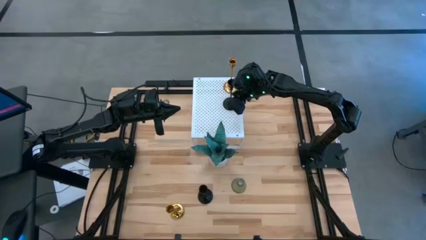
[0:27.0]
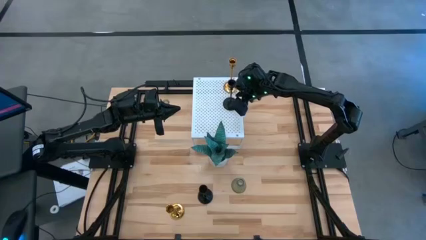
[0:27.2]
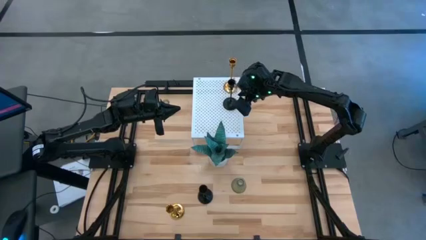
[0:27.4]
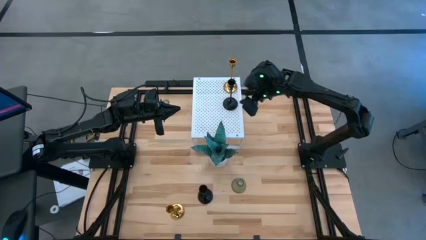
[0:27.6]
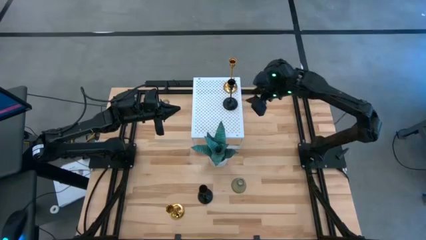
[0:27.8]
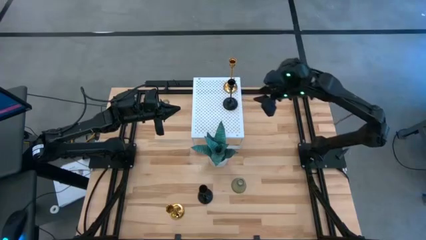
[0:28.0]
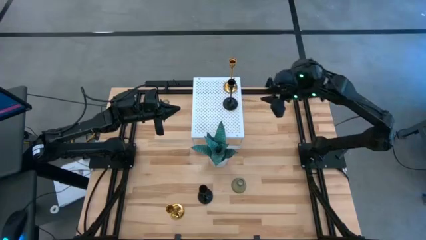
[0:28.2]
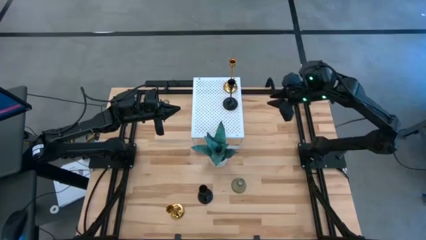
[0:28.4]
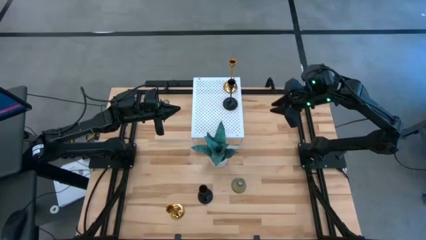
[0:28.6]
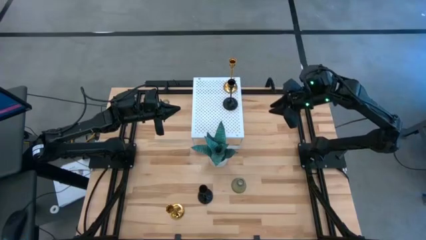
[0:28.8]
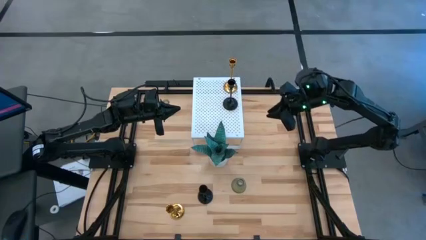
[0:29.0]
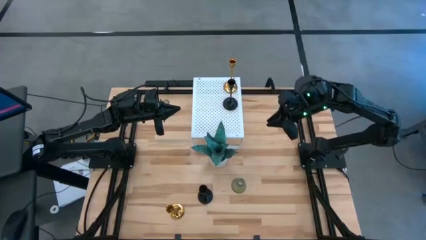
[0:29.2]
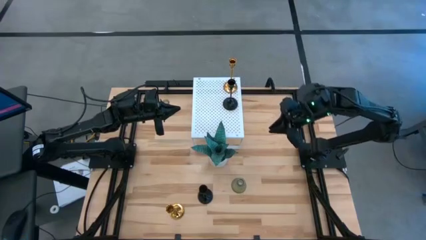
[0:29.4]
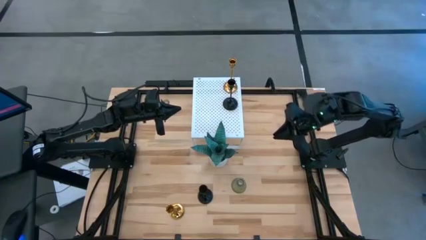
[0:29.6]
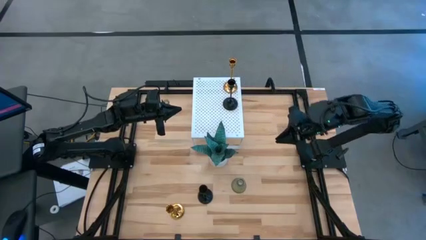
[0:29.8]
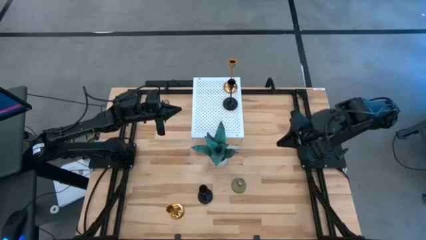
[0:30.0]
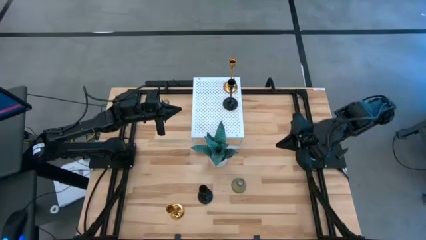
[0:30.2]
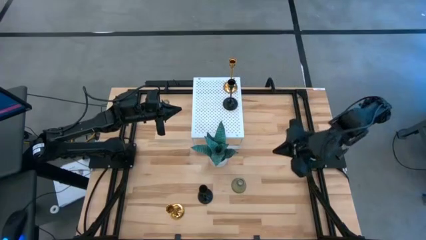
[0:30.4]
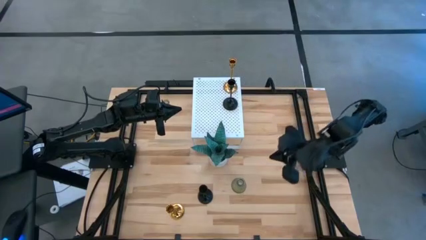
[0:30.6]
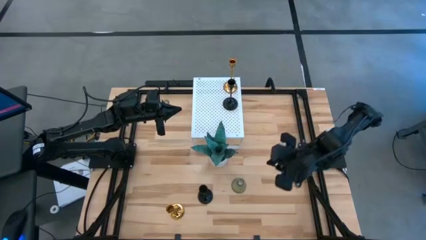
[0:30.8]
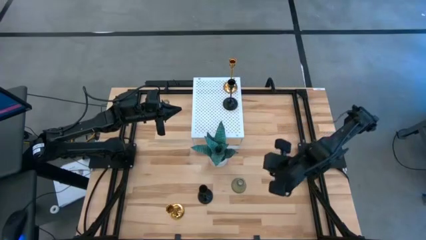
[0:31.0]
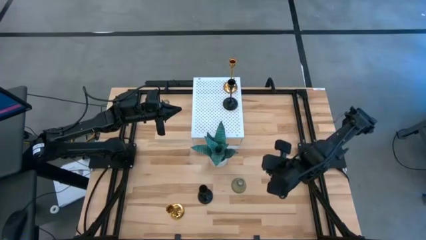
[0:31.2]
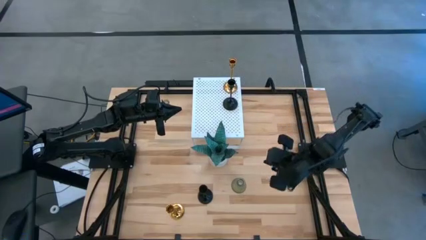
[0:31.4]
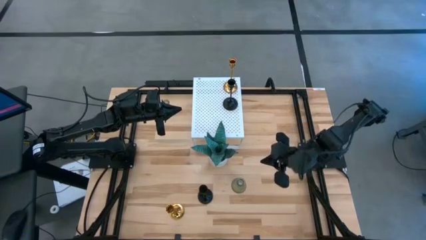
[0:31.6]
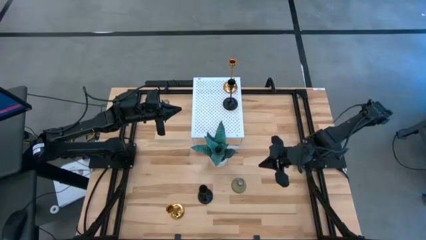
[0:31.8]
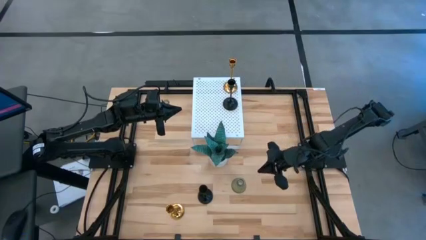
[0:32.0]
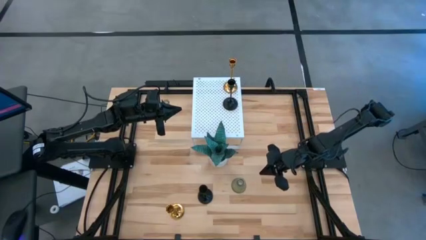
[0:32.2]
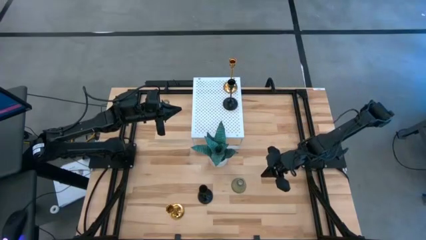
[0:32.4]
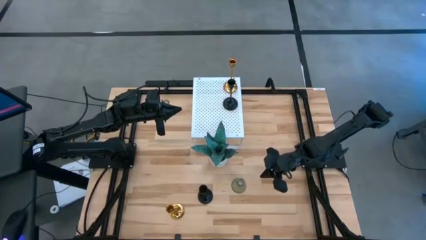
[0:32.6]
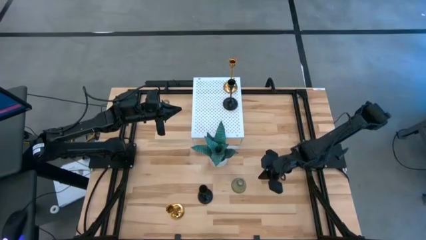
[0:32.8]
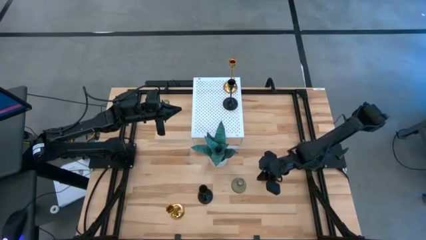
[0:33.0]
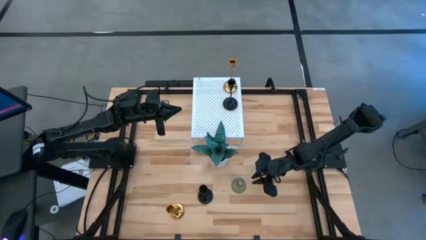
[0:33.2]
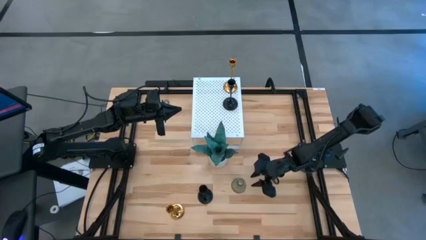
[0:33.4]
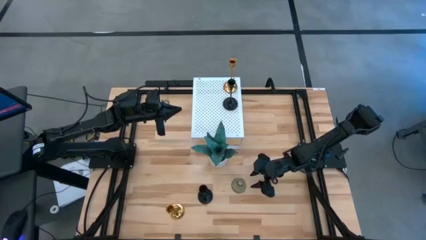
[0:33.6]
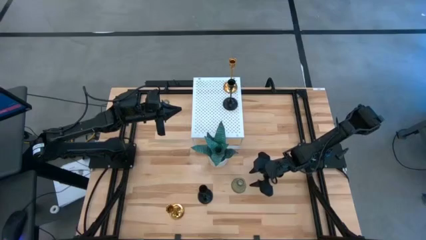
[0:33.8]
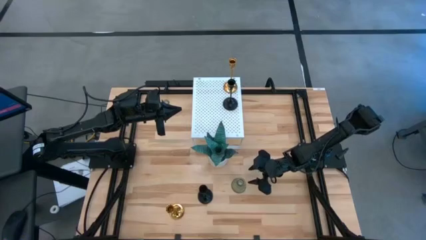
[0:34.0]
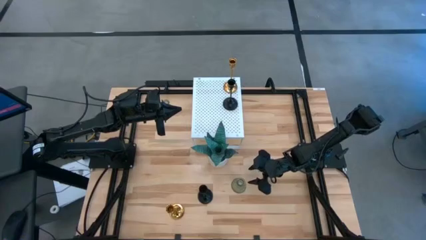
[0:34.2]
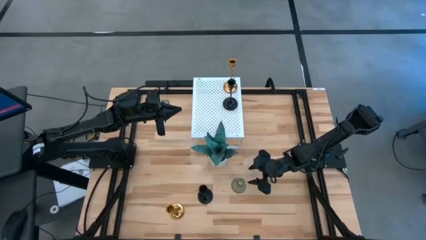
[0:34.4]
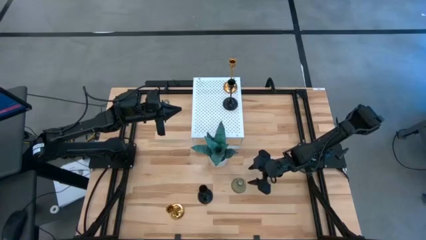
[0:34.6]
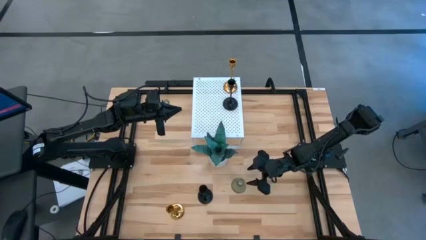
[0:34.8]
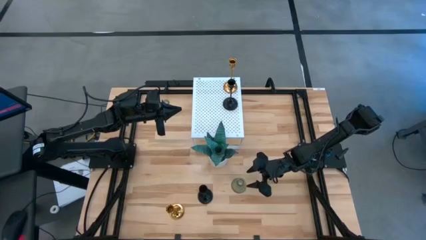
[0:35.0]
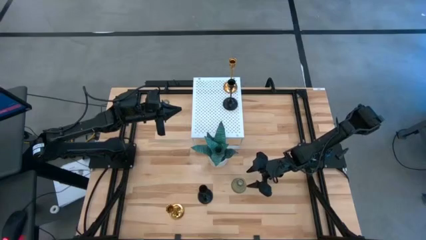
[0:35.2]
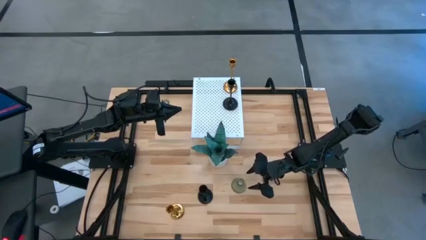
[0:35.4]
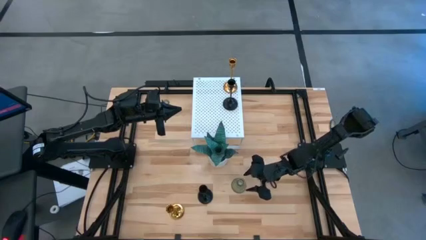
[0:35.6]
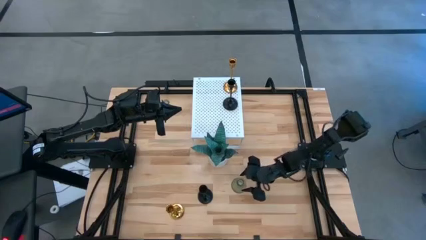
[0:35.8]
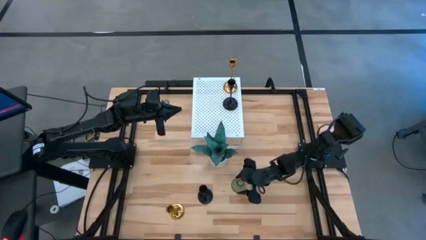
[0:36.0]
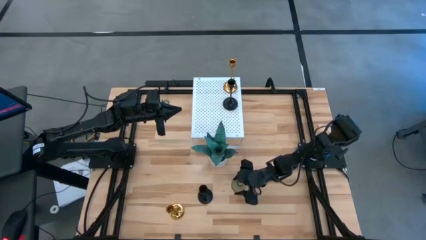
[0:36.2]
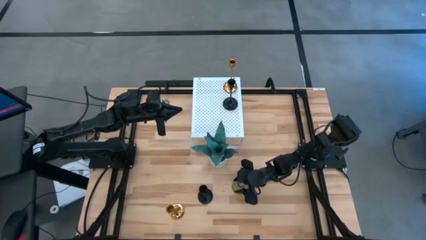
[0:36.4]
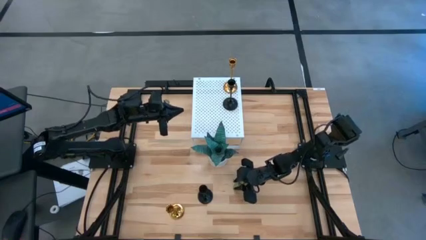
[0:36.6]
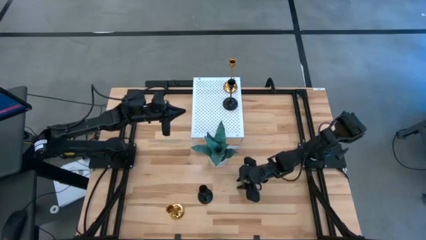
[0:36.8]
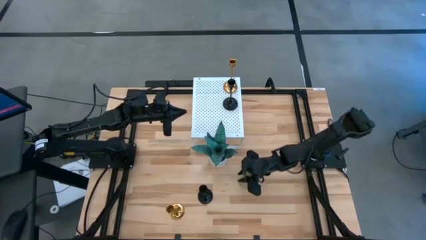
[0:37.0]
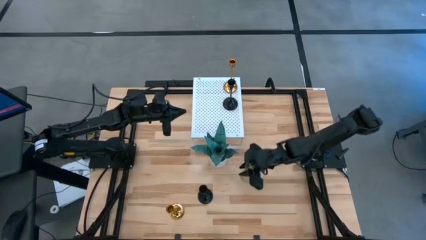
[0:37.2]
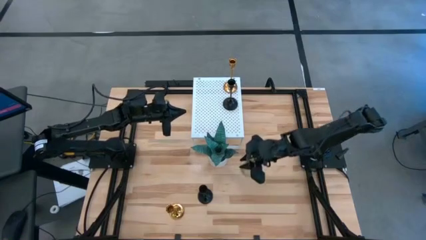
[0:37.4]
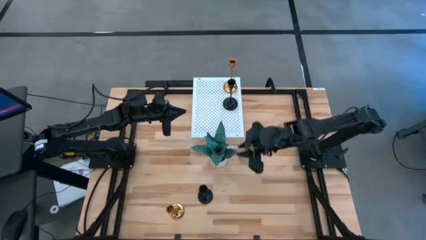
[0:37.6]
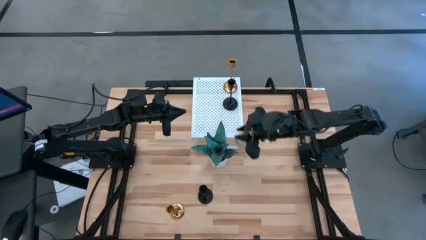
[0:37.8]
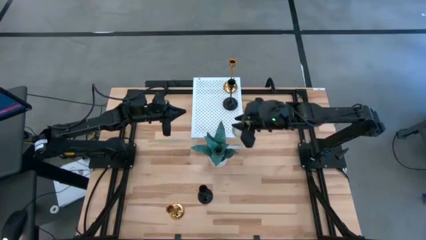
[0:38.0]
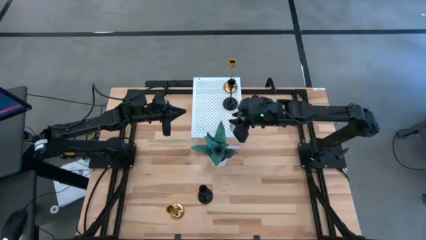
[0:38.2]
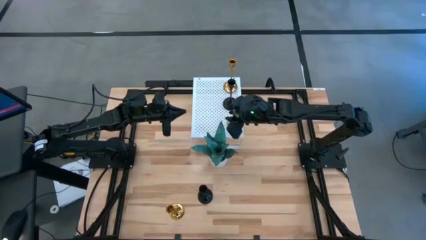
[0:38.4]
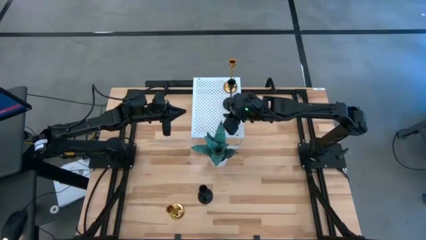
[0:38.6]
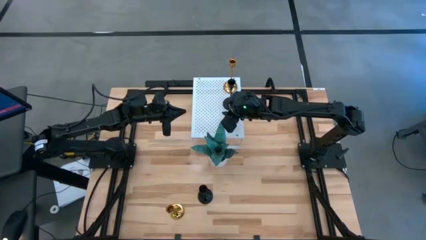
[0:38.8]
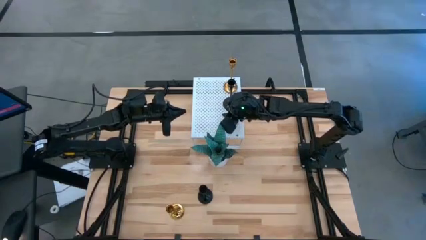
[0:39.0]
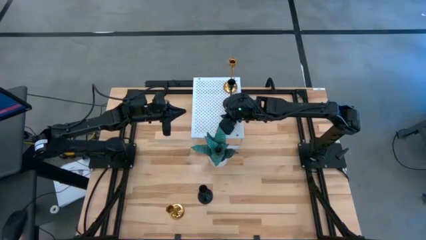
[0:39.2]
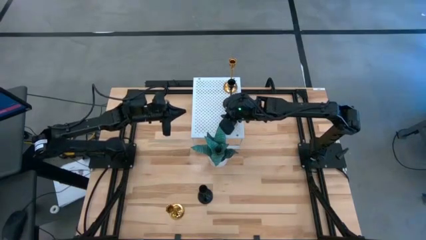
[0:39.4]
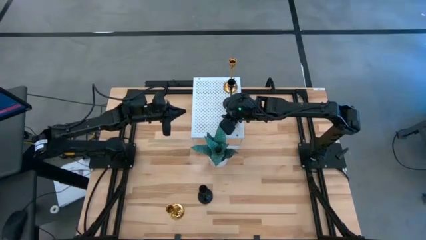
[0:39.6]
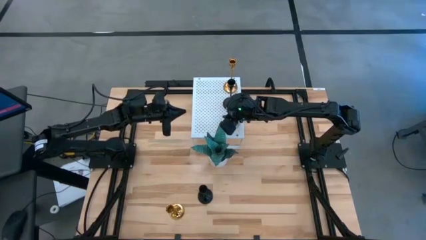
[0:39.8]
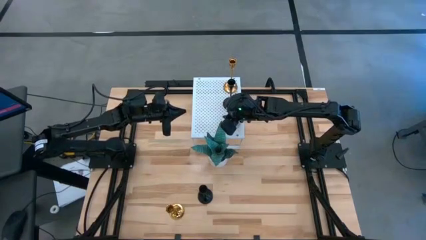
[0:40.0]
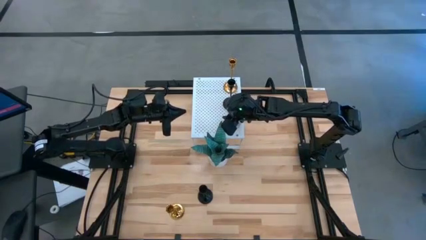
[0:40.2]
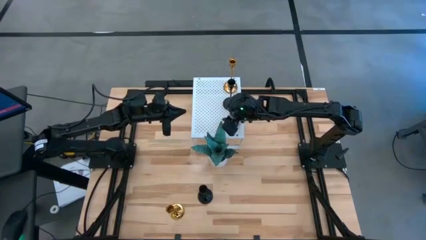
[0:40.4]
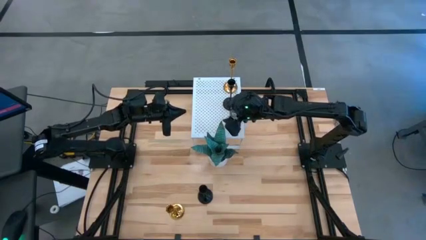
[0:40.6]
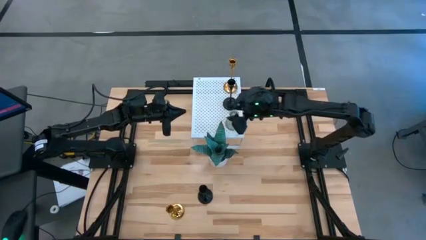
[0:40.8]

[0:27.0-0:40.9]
Task: Pick & Place candle stick holders
Put the bottom transparent candle holder on the shelf
